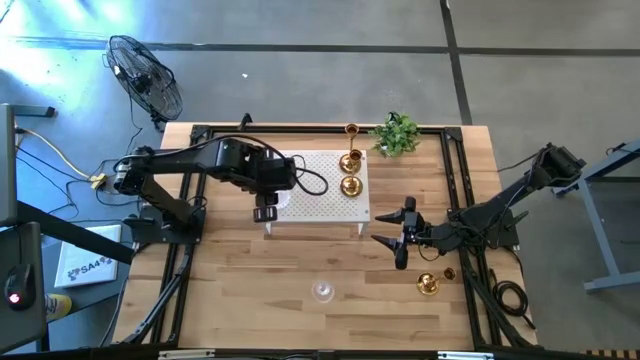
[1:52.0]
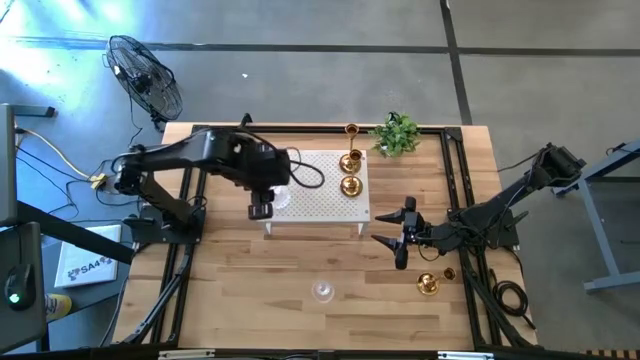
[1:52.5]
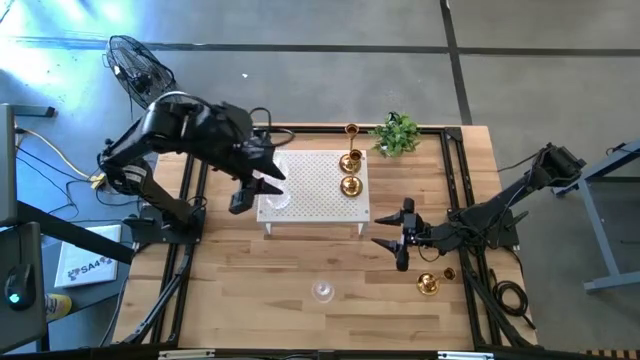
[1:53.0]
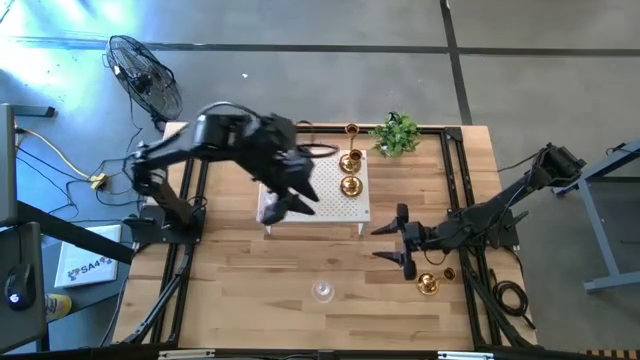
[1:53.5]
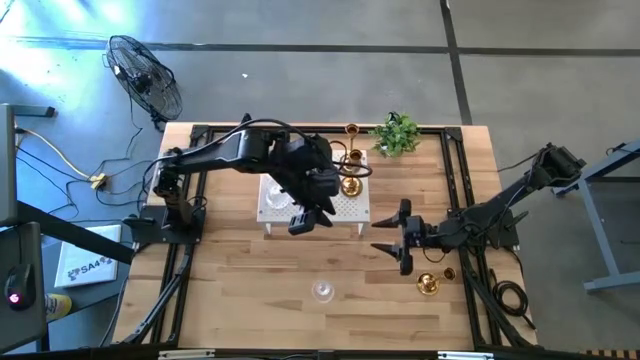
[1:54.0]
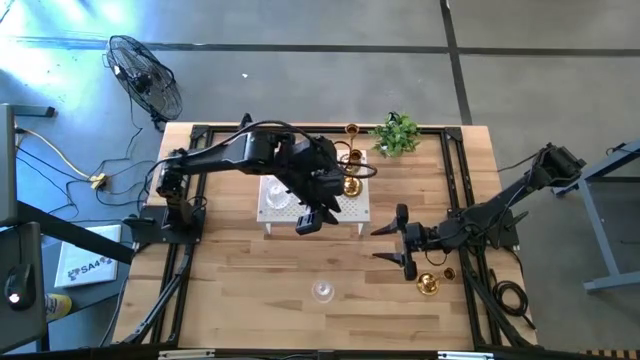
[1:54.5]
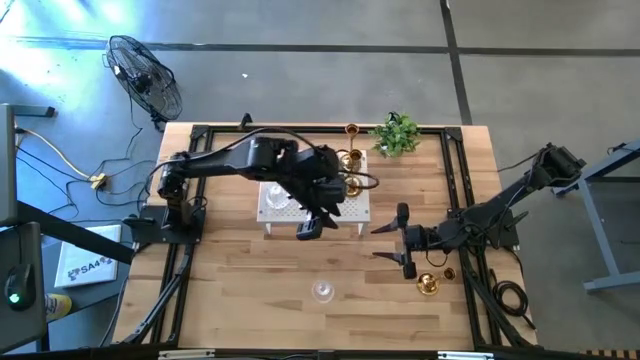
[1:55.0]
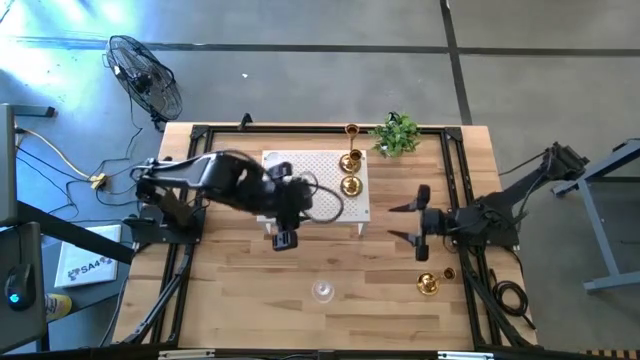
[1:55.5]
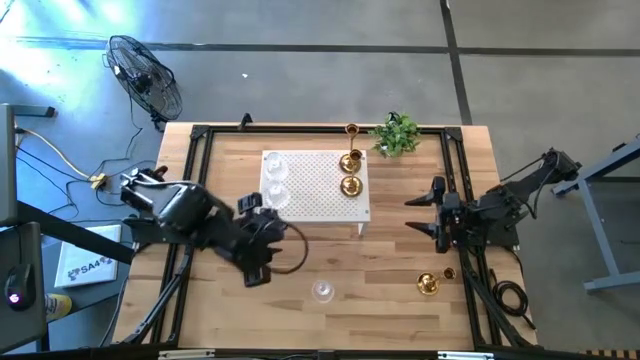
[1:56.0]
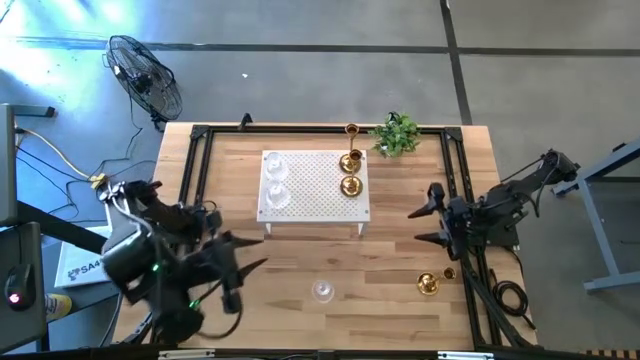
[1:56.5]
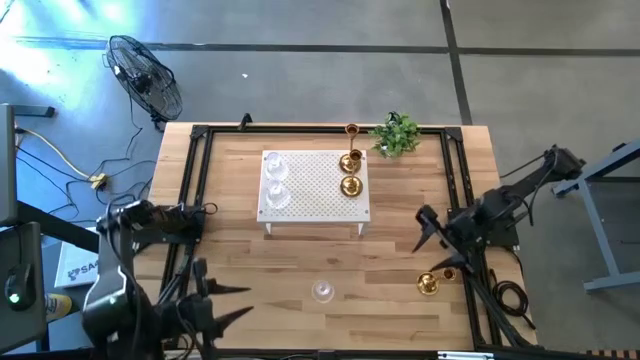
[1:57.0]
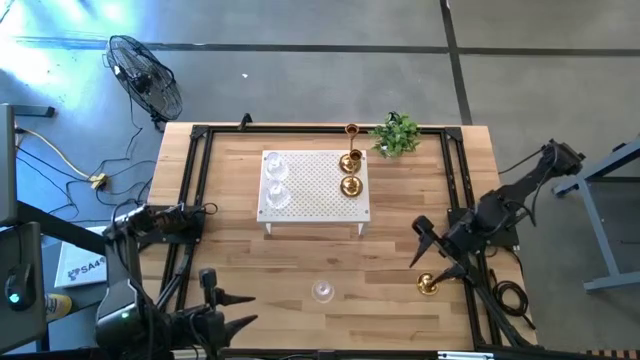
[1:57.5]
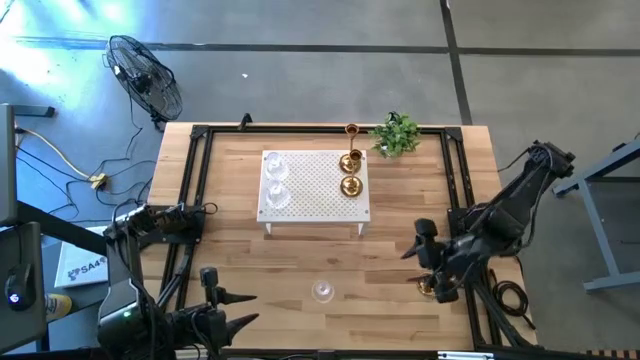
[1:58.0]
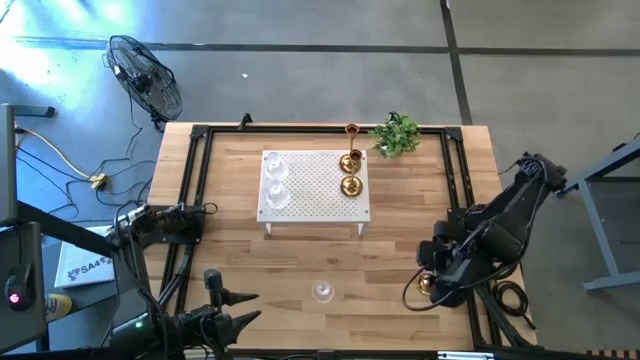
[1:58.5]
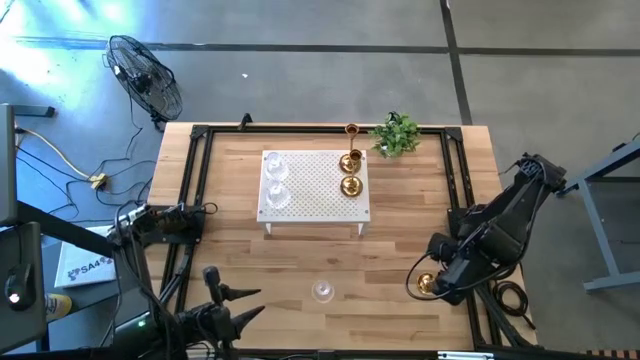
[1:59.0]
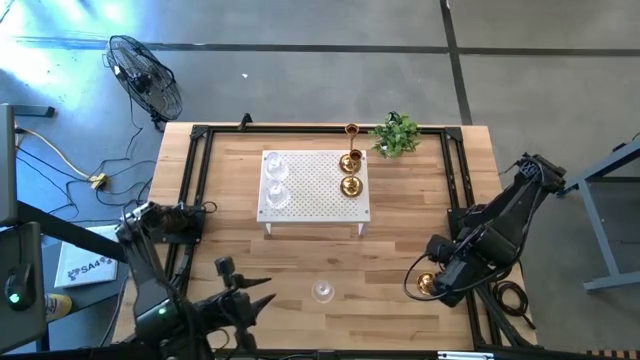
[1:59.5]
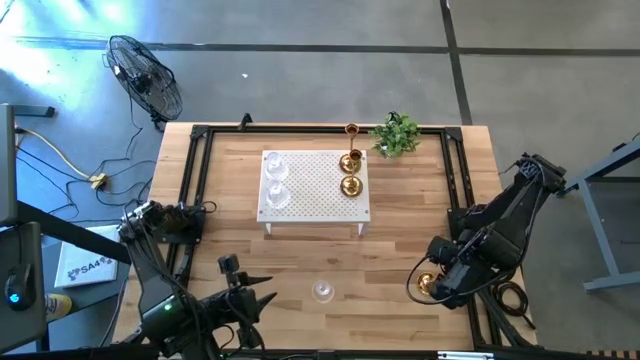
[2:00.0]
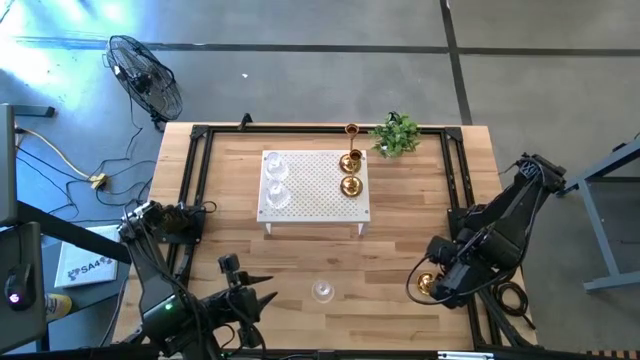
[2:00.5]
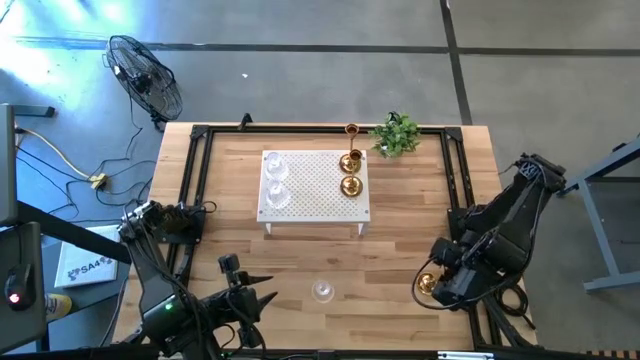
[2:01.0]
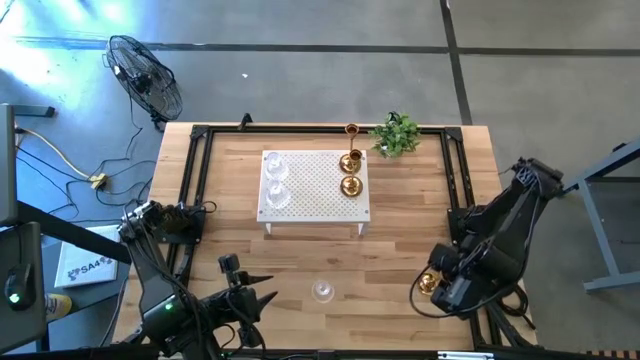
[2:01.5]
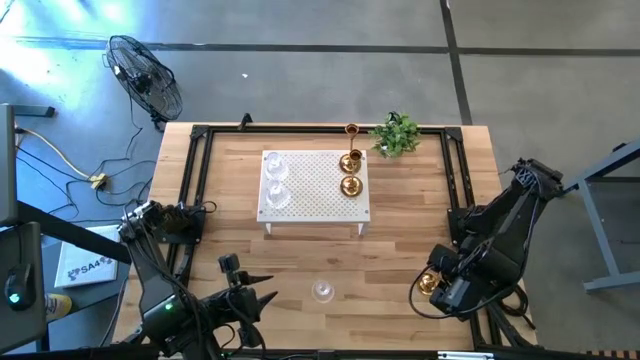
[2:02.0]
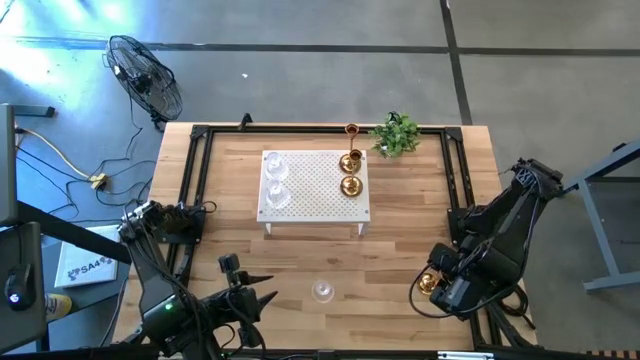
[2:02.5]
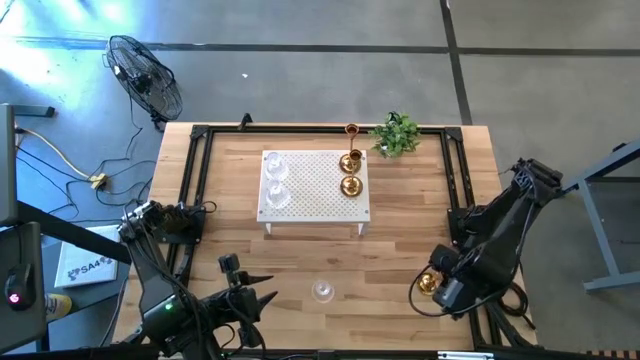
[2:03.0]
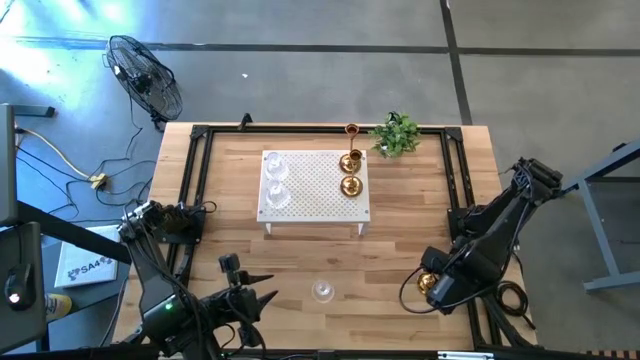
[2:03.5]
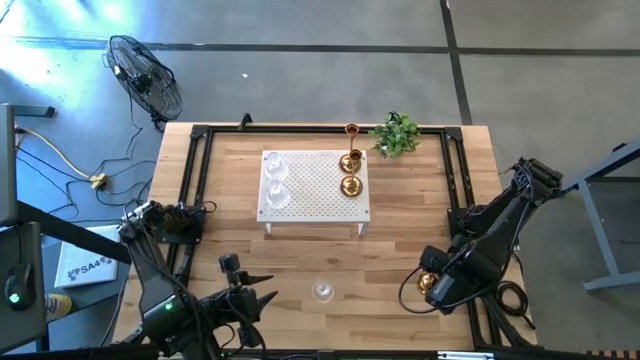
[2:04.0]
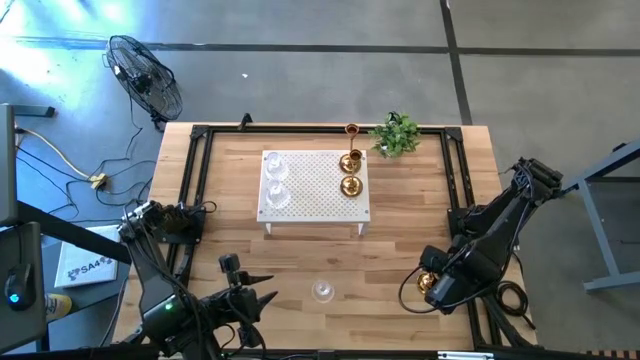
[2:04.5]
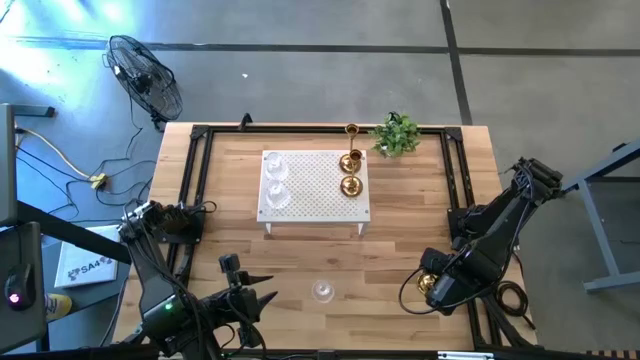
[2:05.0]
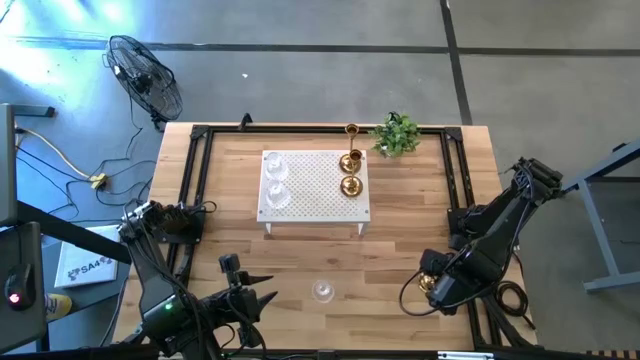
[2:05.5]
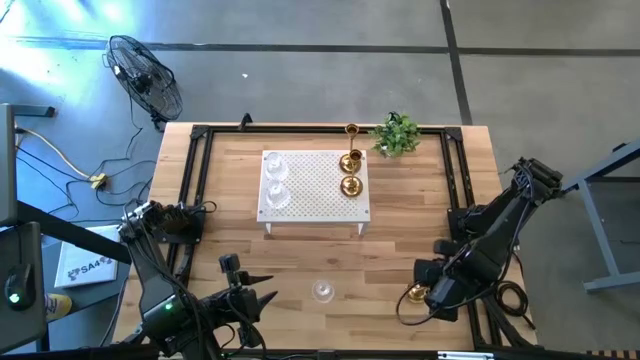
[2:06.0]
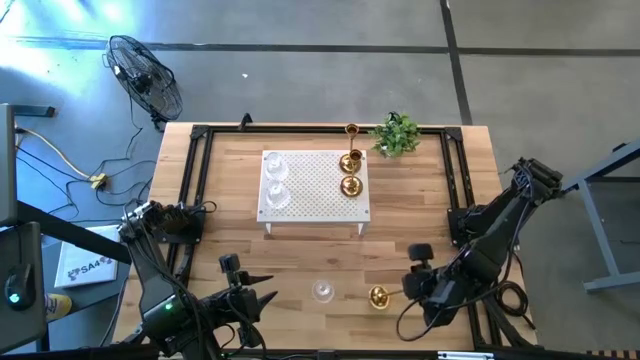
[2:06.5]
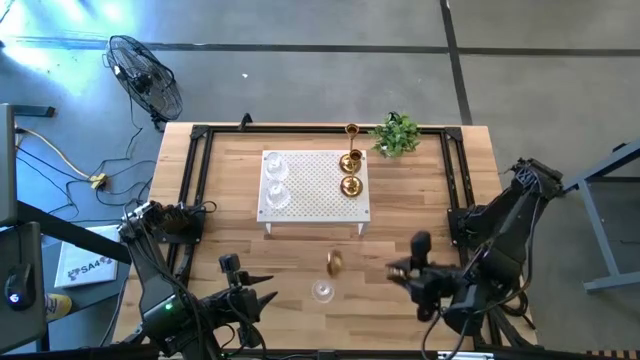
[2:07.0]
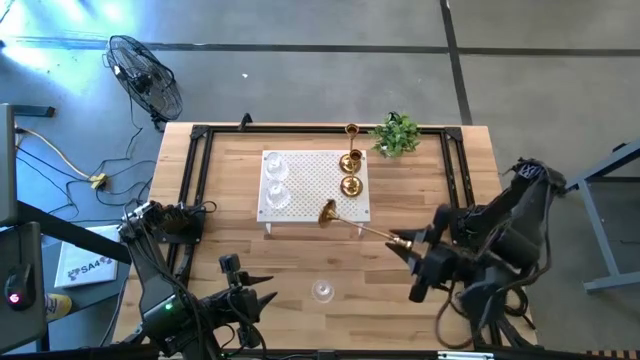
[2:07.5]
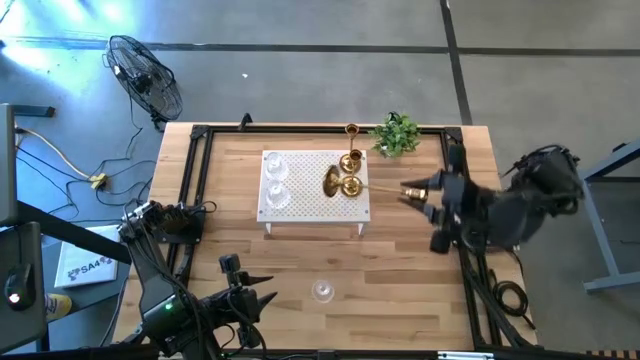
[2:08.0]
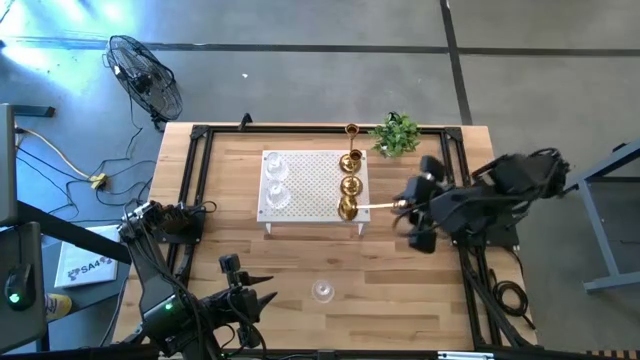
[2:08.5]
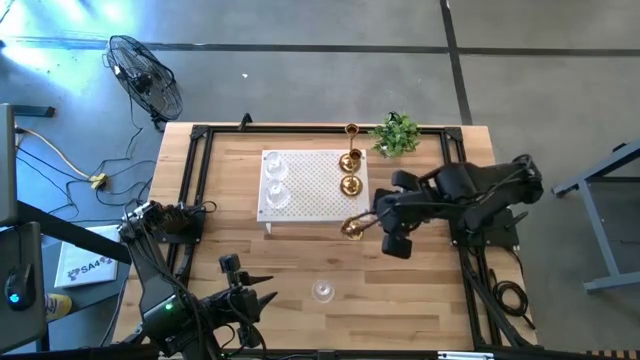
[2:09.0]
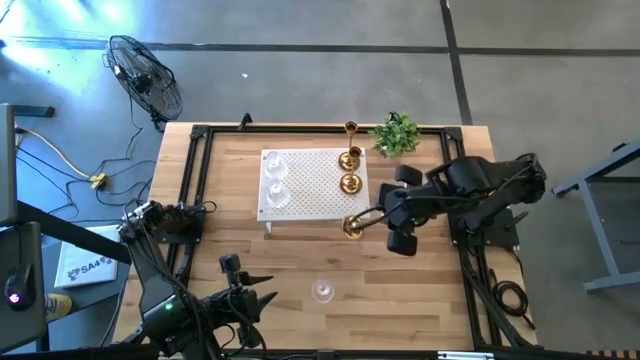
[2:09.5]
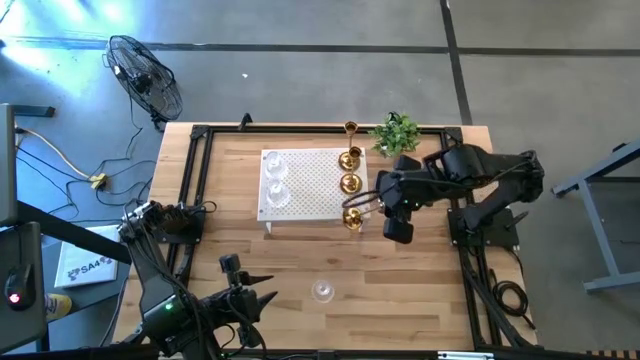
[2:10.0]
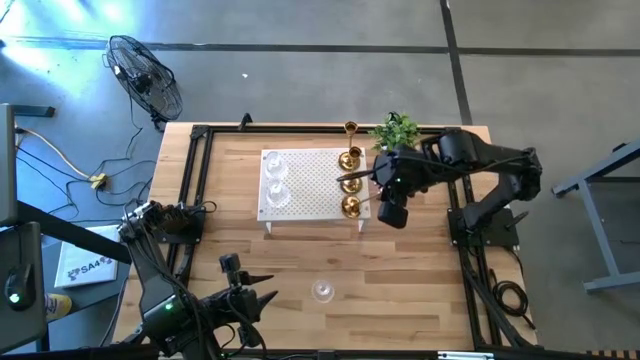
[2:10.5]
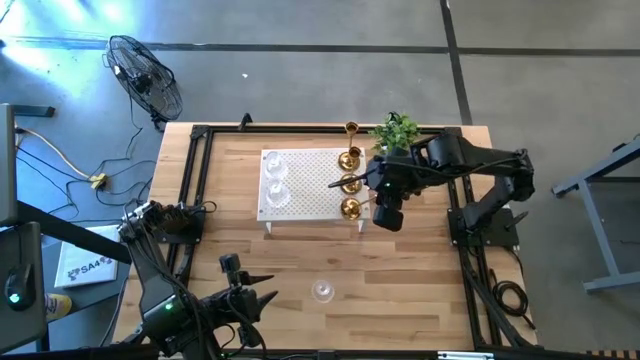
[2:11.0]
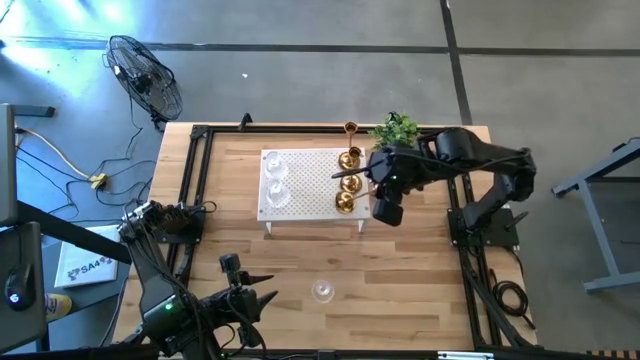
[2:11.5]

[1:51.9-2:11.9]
Task: Pick & Place candle stick holders
Put the gold candle holder on the shelf aligned with the other gold candle holders

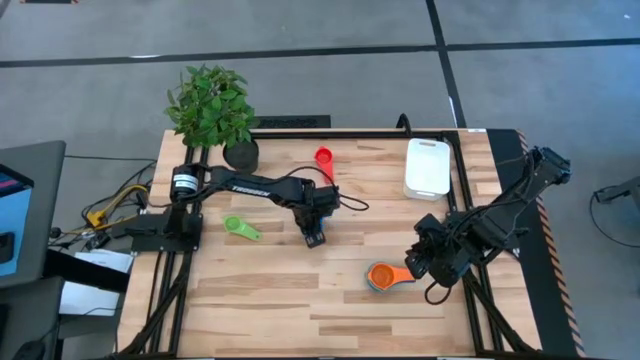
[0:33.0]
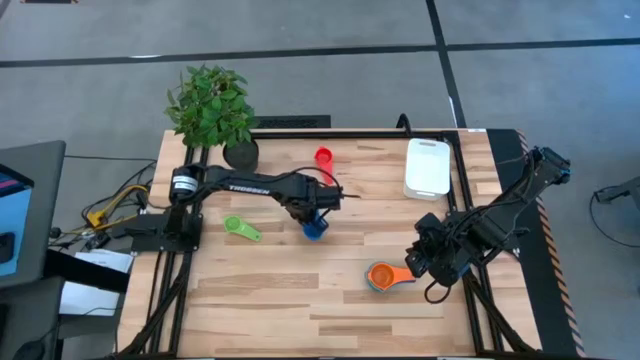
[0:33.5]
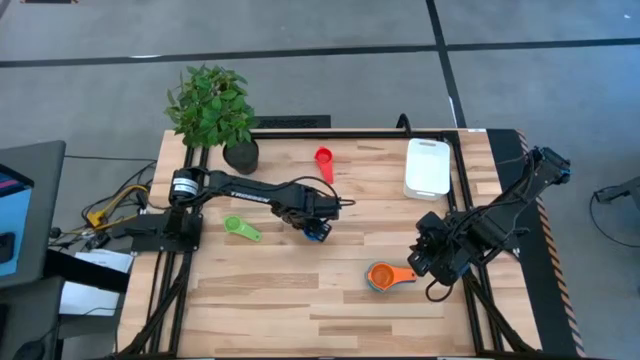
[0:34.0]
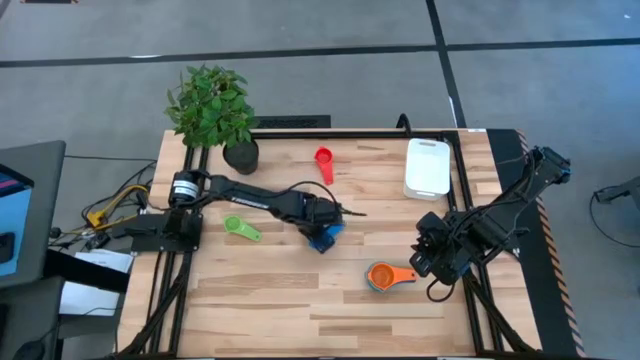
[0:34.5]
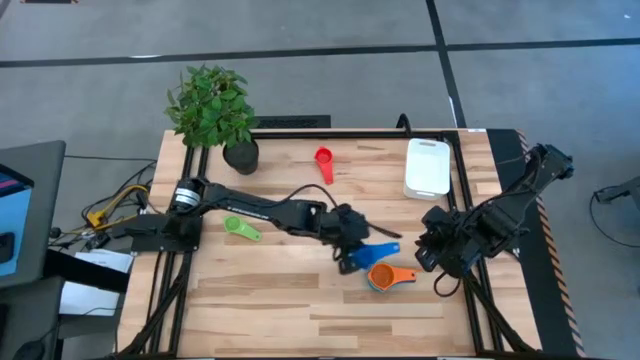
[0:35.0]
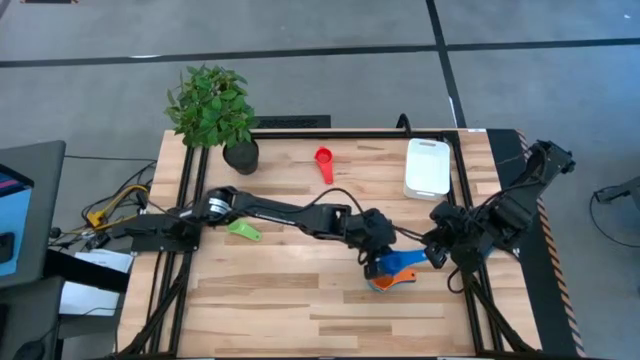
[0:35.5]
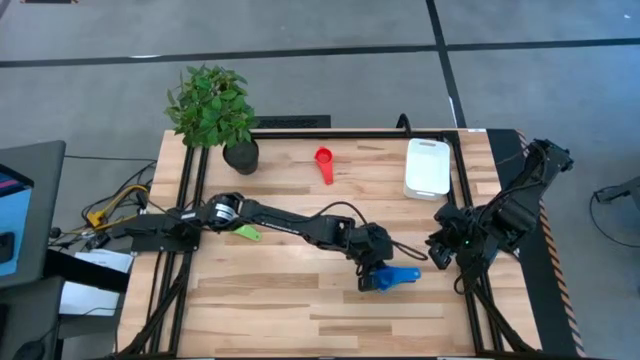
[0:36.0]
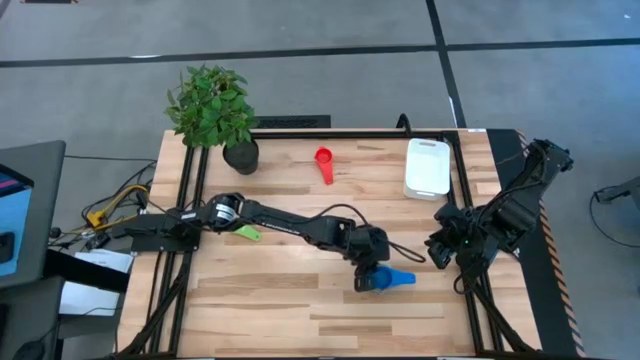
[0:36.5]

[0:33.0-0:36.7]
Task: Nest measuring cups in basket
Stack the blue measuring cup on the orange measuring cup
